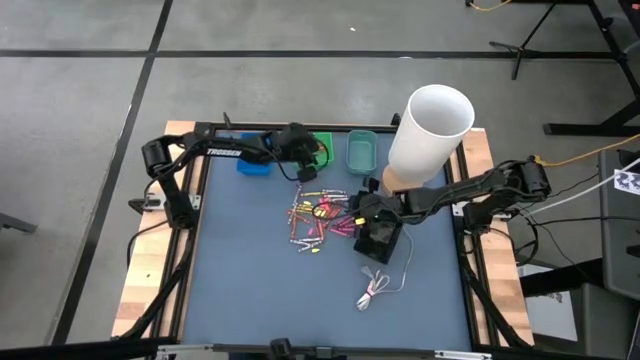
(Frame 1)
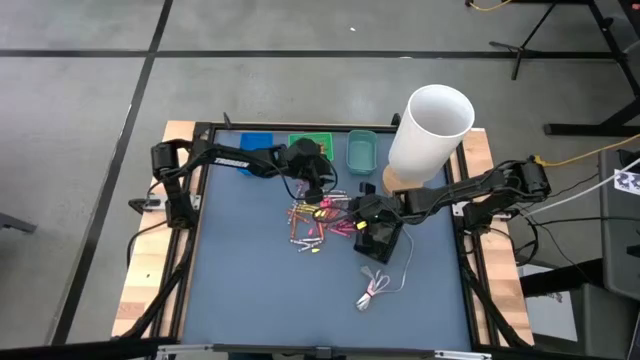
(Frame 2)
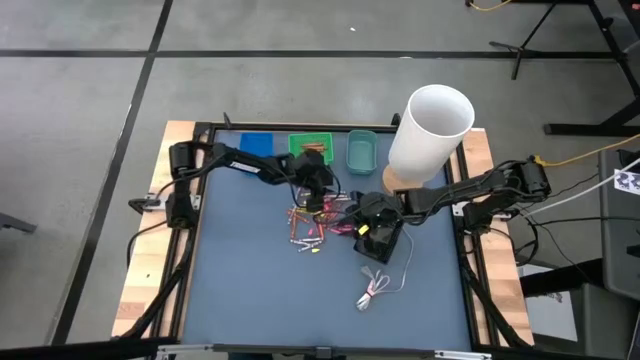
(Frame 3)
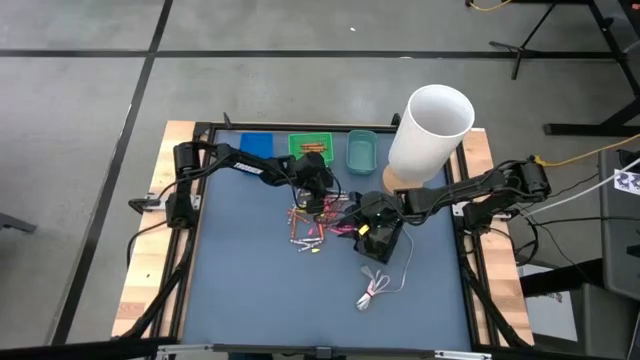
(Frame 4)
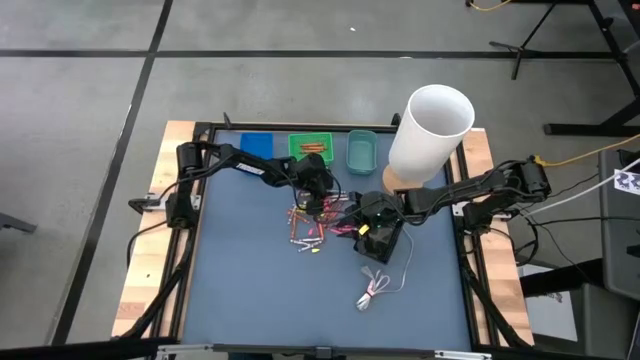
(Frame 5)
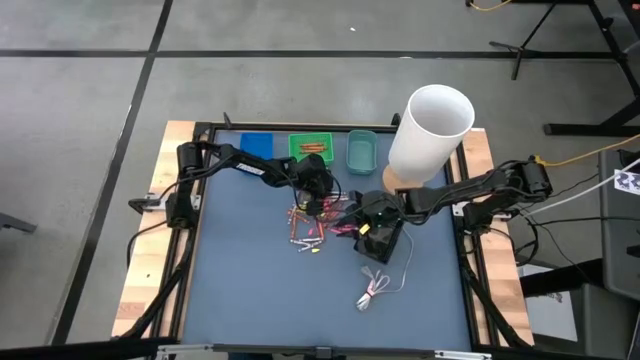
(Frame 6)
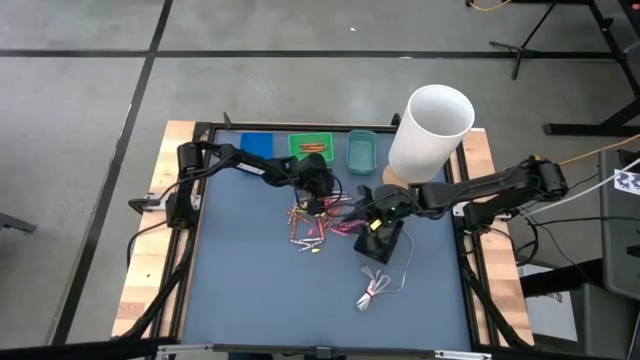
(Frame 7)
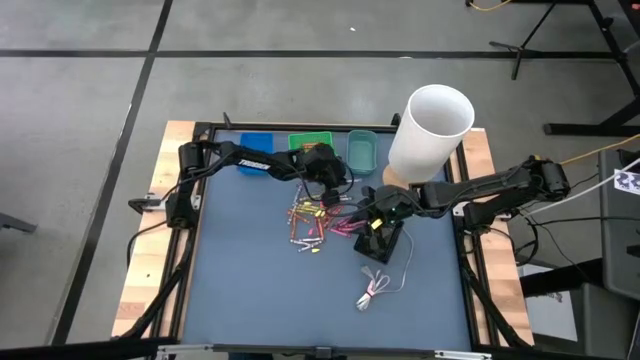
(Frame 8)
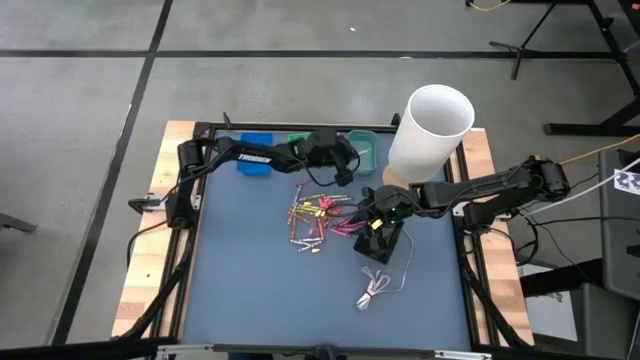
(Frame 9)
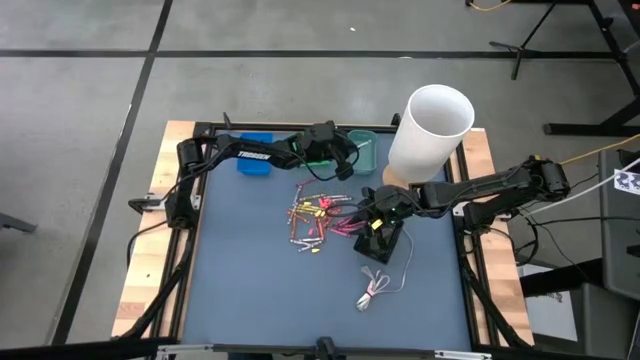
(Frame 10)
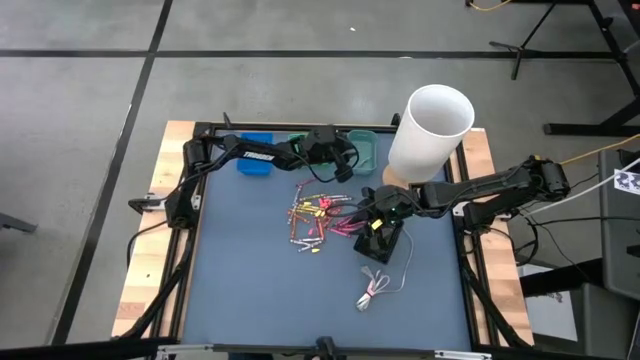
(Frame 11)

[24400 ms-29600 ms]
Task: Sort crayons
Put the gray crayon into the dark green bin

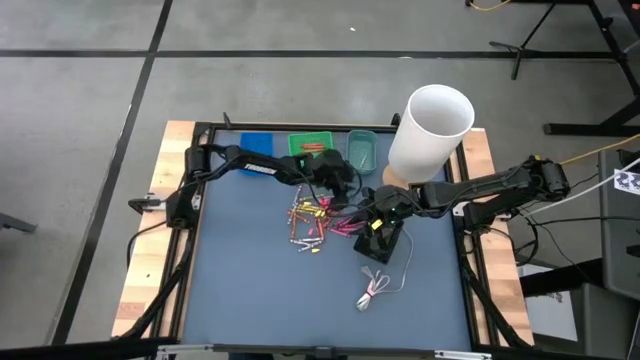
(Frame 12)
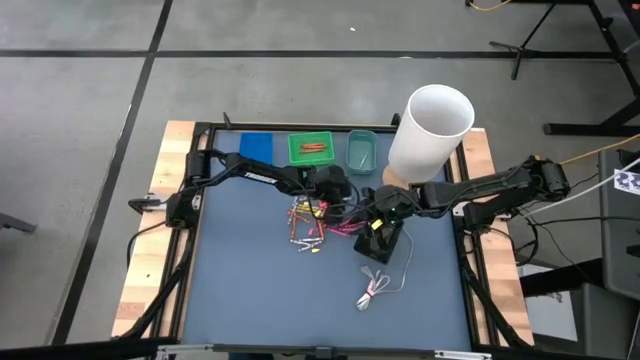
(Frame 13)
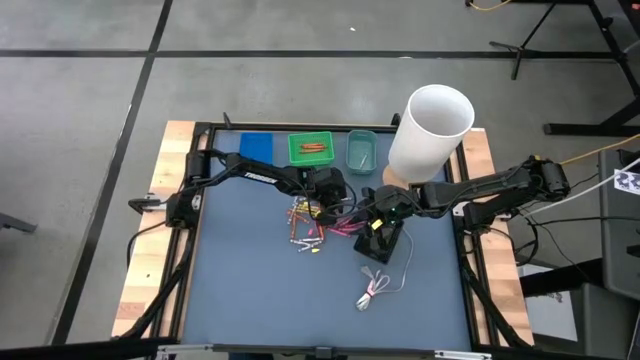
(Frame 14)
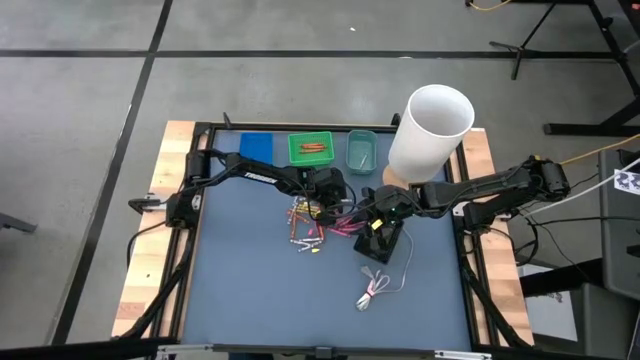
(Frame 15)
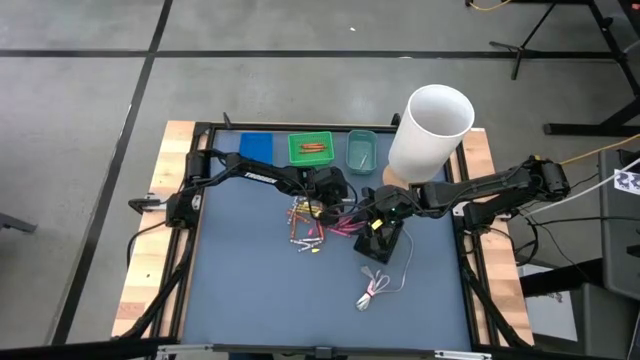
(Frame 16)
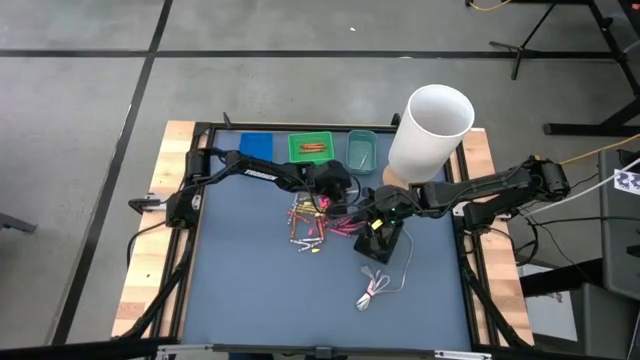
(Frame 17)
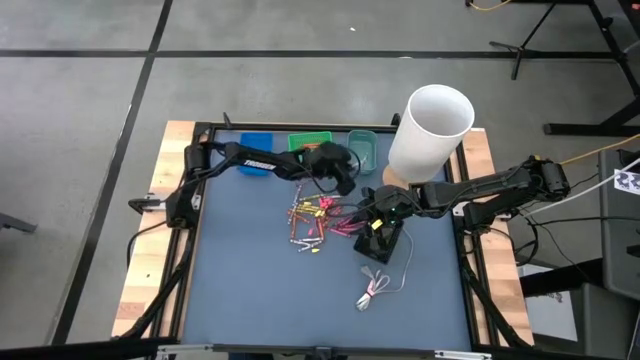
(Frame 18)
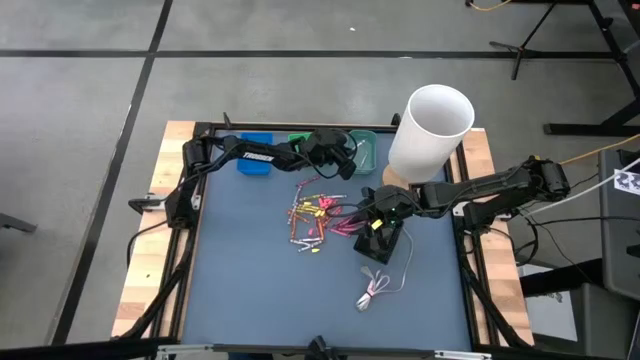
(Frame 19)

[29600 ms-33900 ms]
Put the gray crayon into the dark green bin

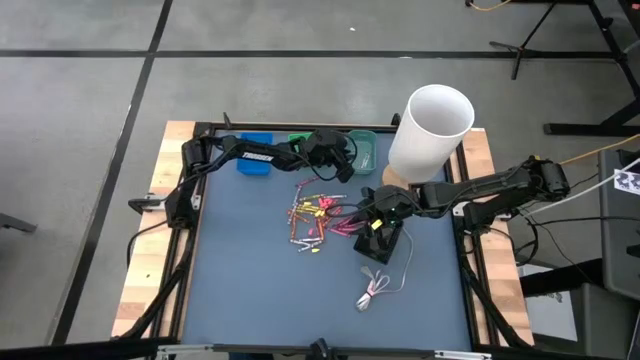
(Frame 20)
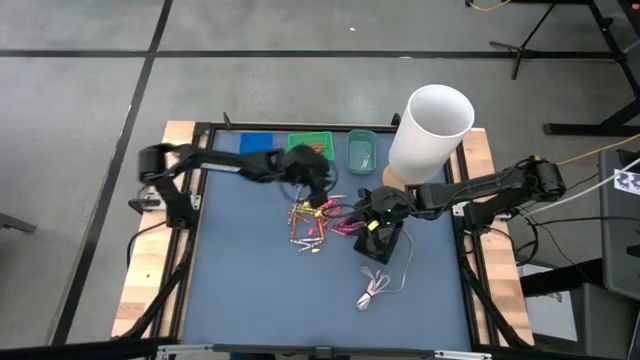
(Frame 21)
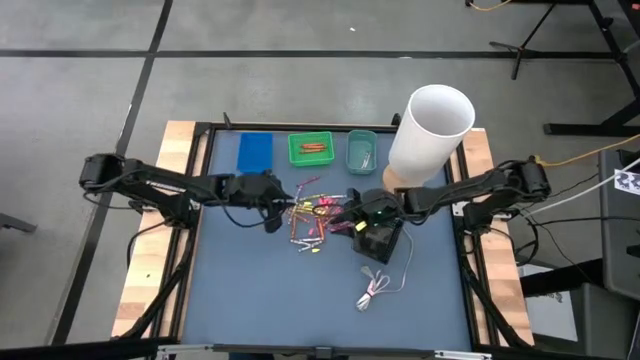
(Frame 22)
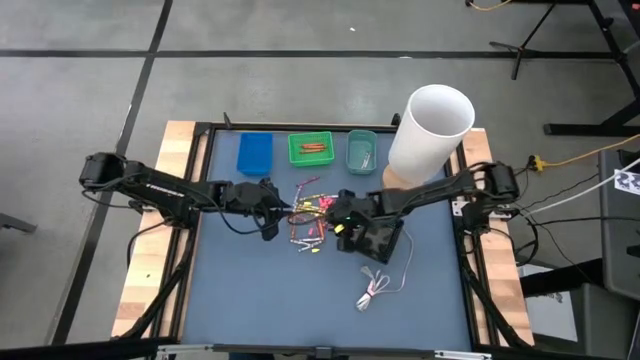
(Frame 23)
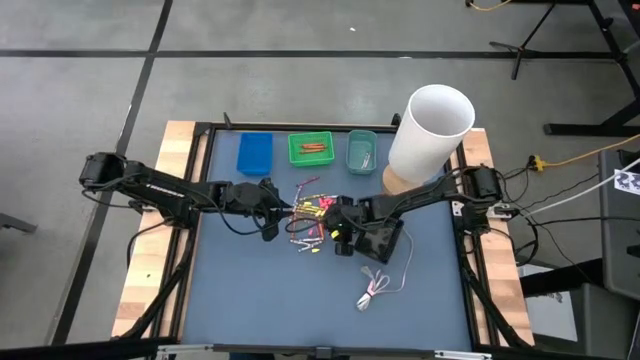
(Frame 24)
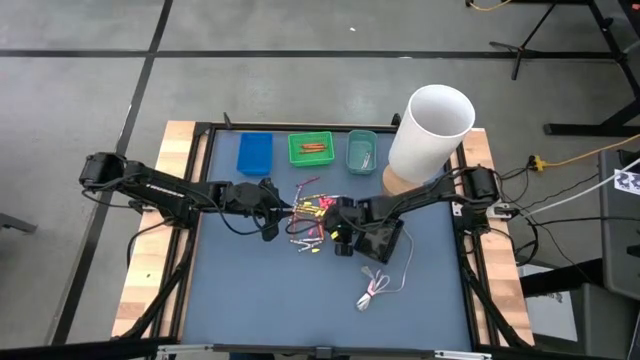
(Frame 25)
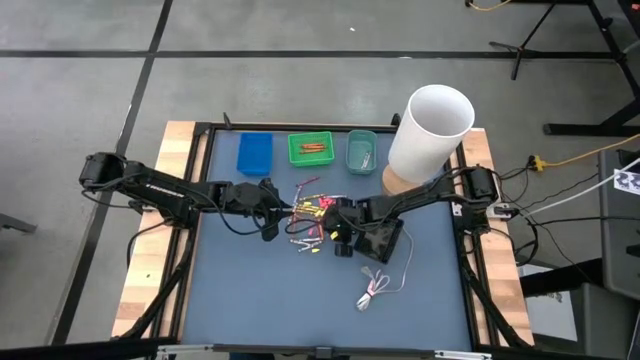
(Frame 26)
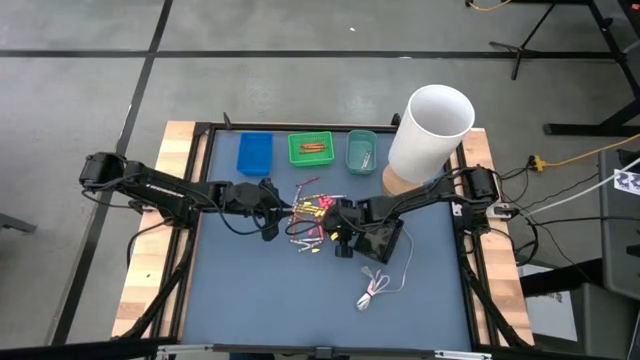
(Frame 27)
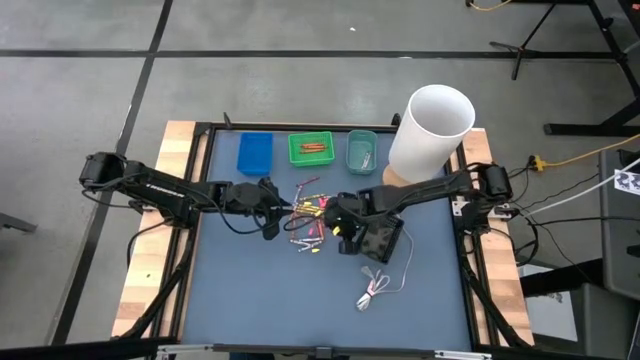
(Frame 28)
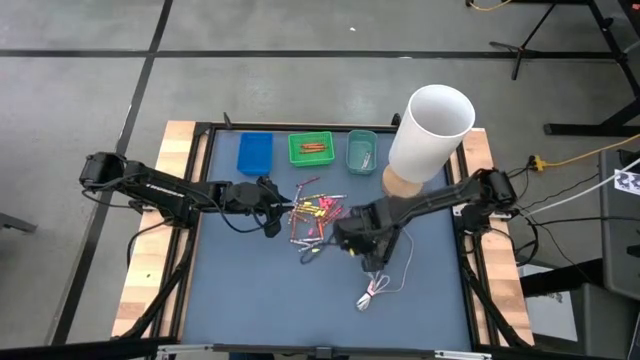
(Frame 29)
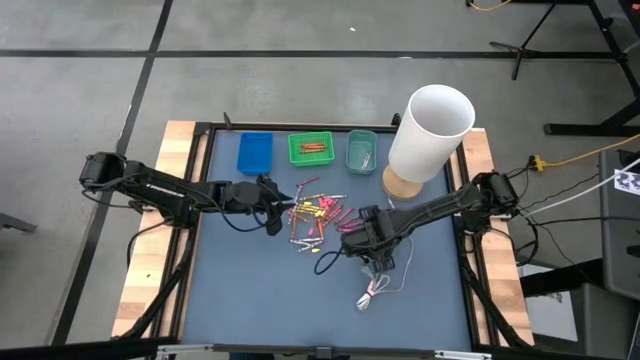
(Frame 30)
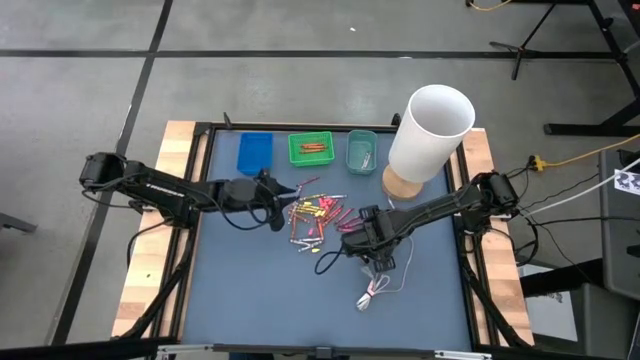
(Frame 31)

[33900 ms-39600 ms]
Put the red crayon into the black bin

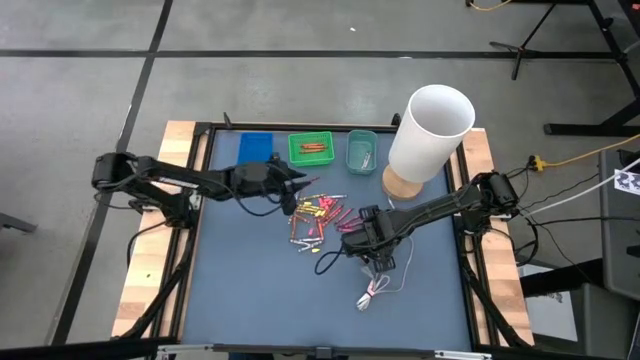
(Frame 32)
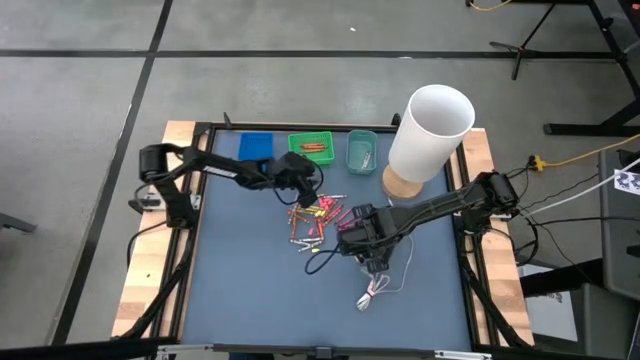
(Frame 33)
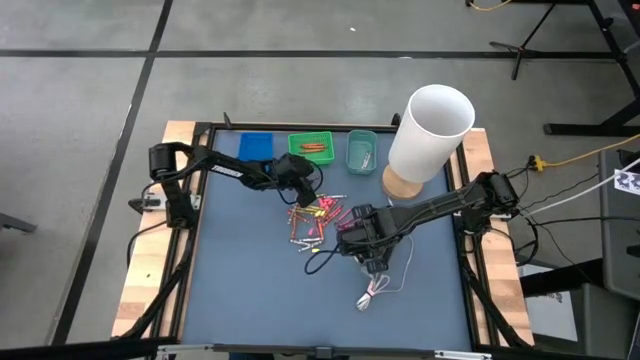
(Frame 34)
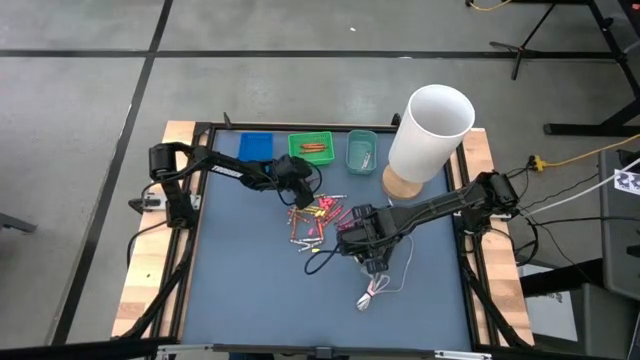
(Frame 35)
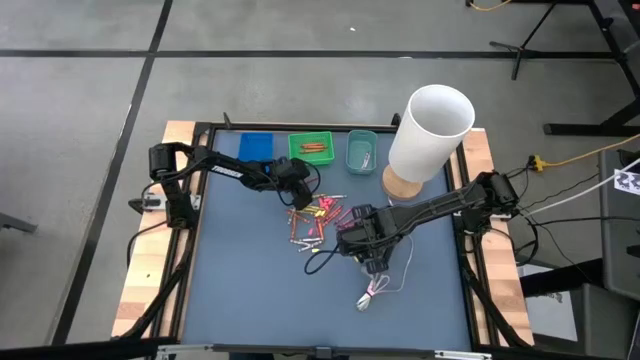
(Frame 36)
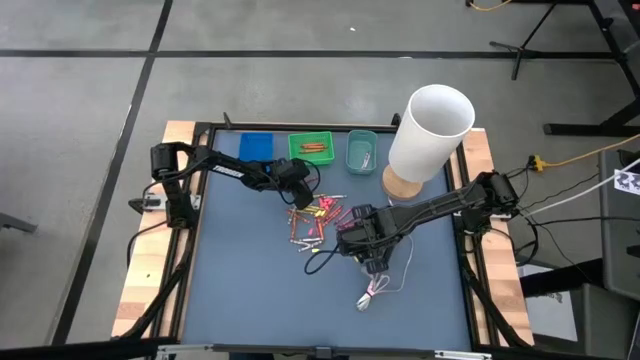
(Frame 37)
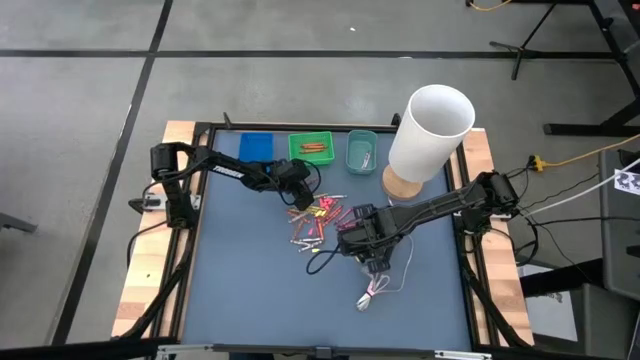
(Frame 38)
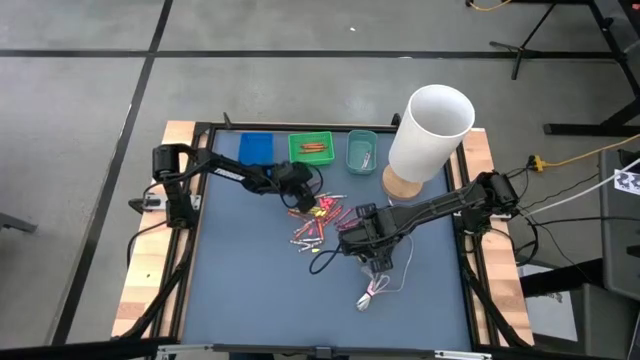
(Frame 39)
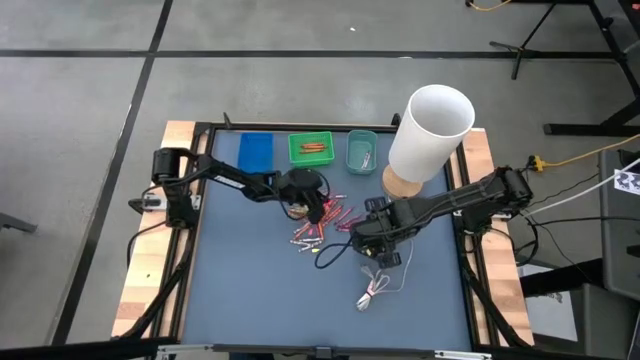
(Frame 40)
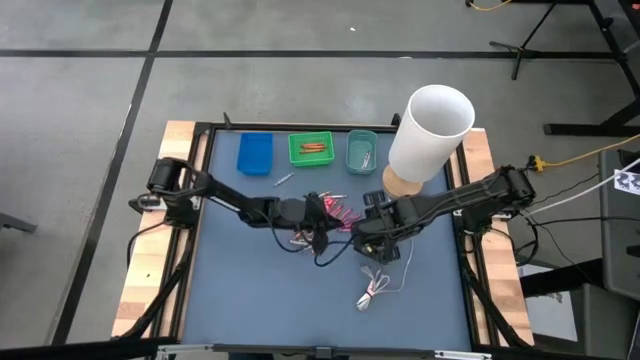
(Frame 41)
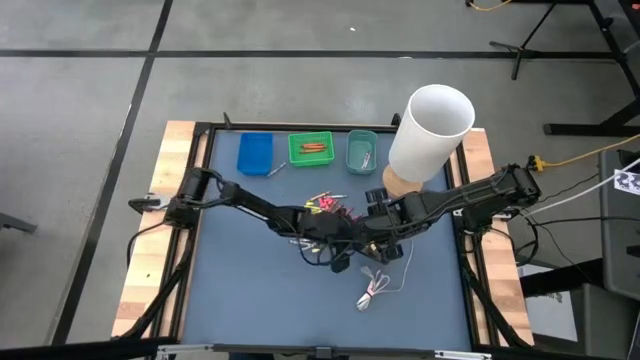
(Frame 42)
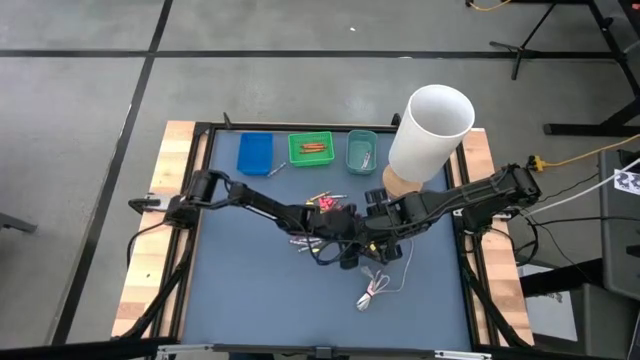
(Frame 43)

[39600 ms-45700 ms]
Put the red crayon into the black bin
